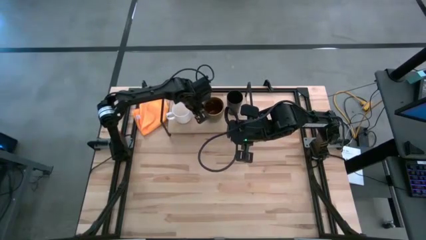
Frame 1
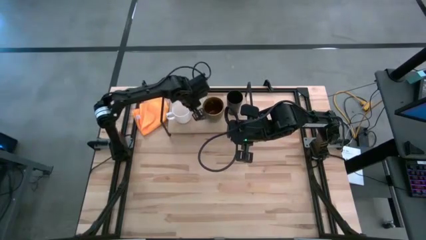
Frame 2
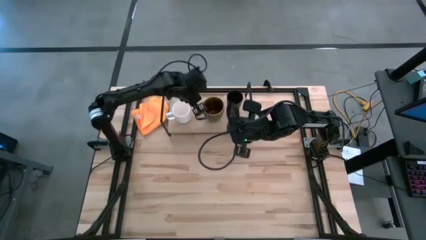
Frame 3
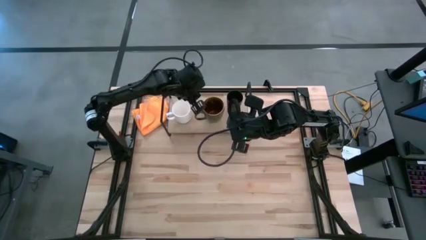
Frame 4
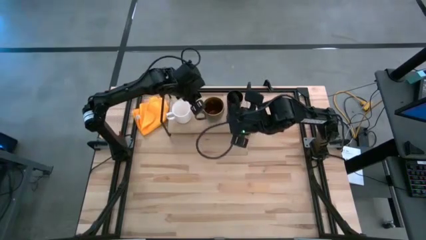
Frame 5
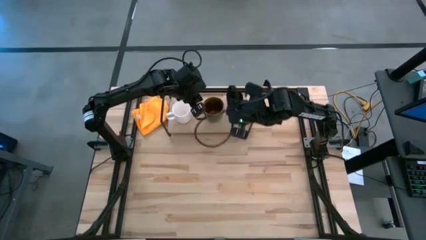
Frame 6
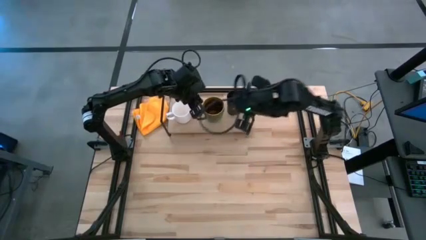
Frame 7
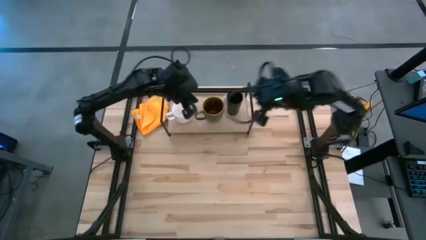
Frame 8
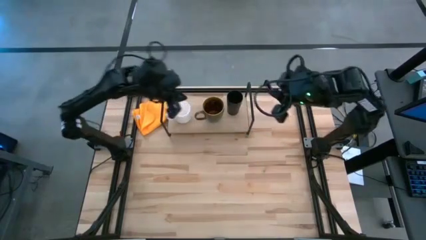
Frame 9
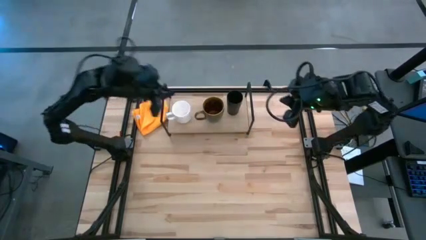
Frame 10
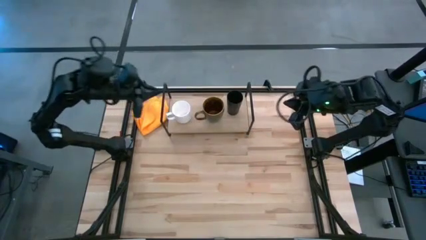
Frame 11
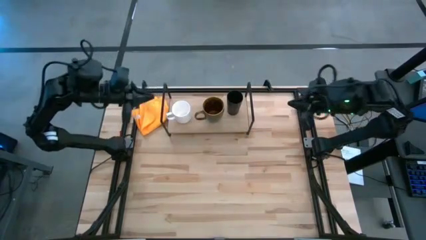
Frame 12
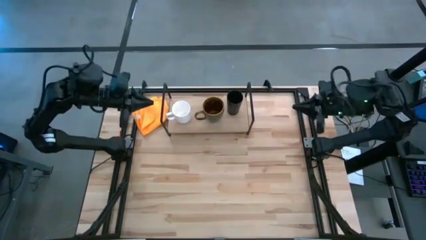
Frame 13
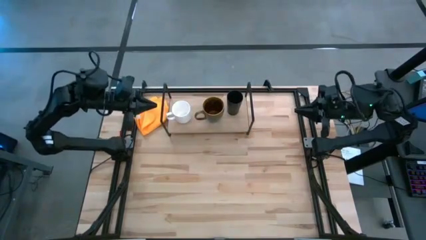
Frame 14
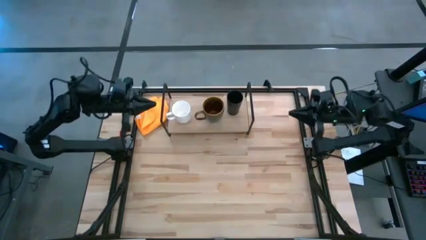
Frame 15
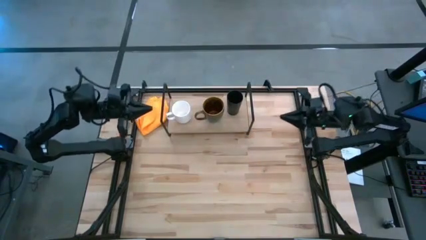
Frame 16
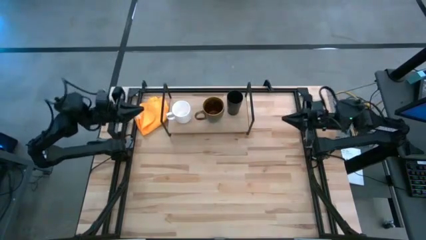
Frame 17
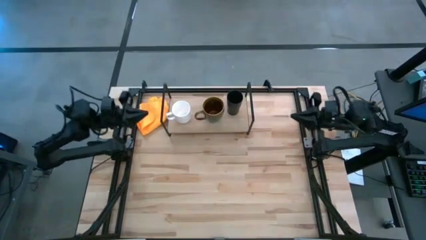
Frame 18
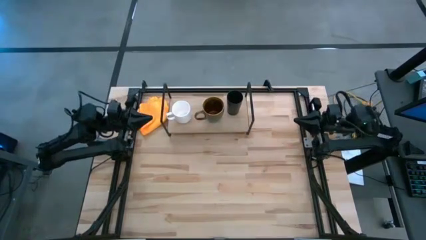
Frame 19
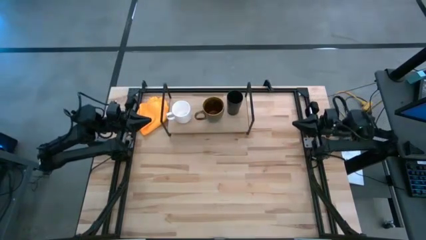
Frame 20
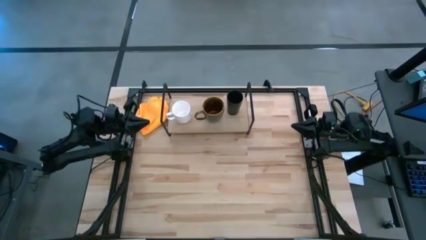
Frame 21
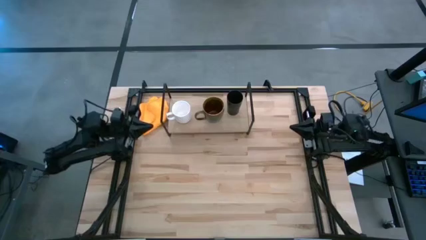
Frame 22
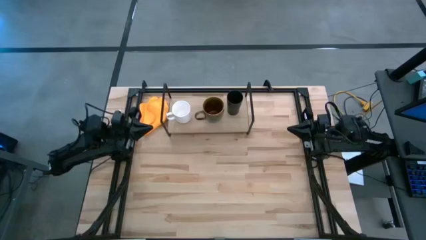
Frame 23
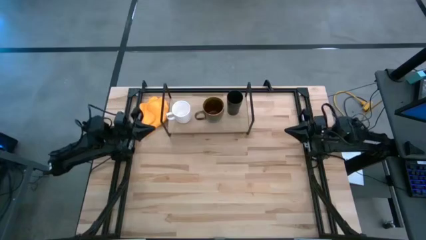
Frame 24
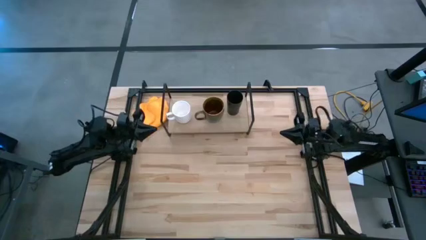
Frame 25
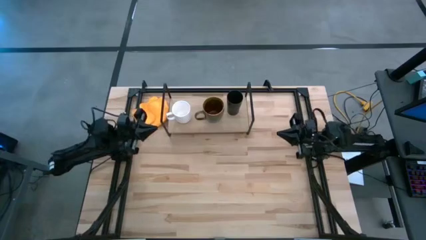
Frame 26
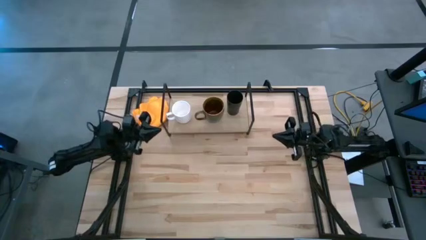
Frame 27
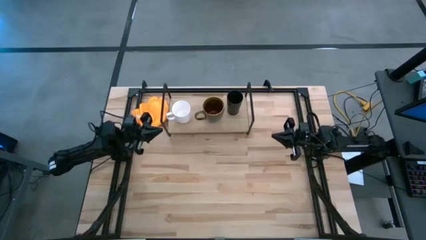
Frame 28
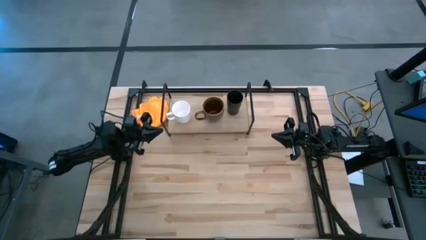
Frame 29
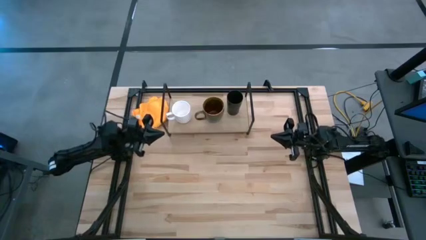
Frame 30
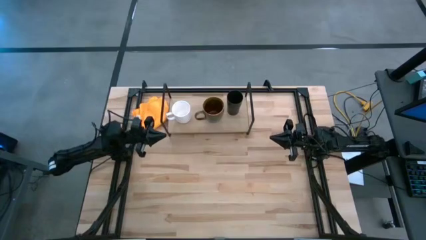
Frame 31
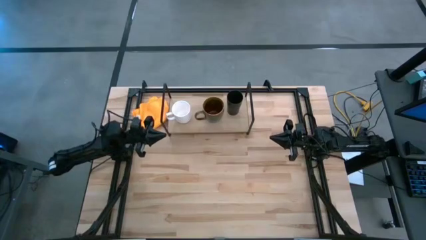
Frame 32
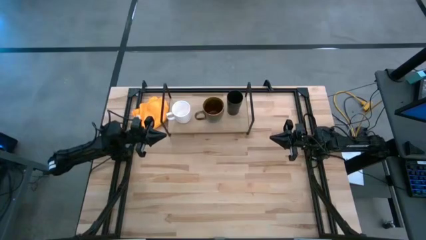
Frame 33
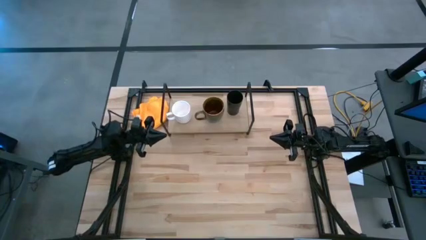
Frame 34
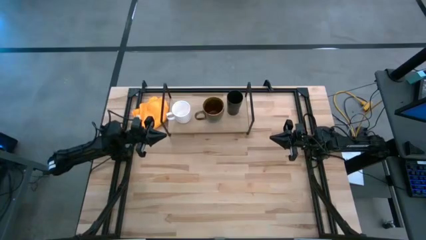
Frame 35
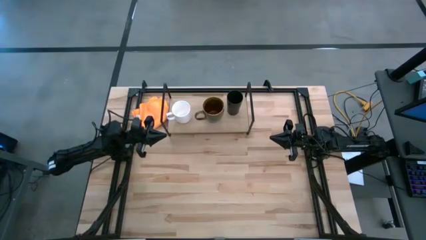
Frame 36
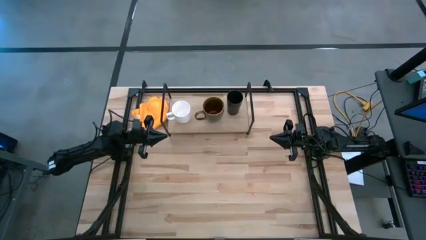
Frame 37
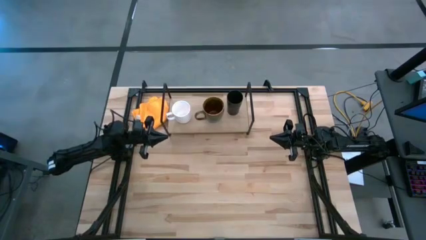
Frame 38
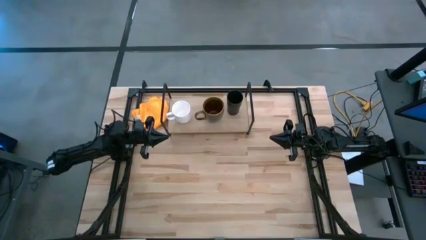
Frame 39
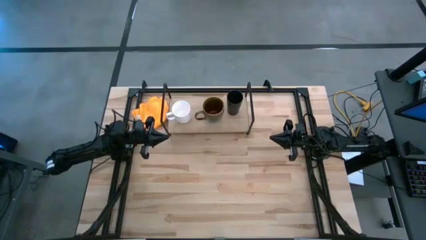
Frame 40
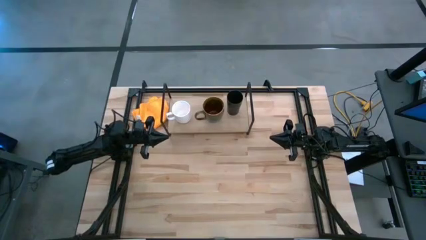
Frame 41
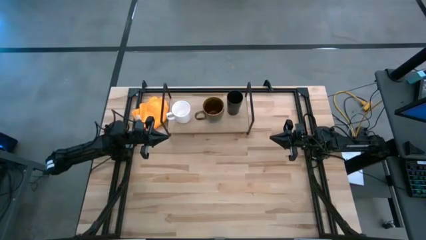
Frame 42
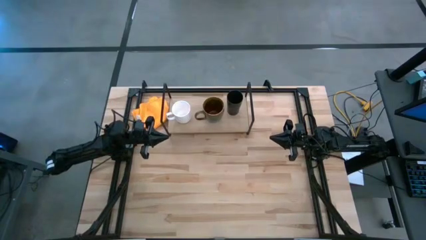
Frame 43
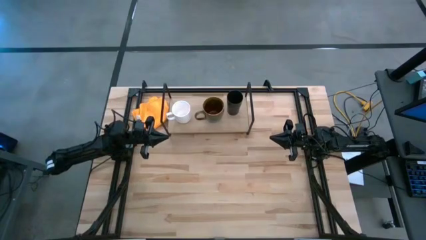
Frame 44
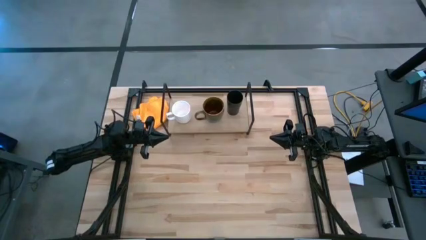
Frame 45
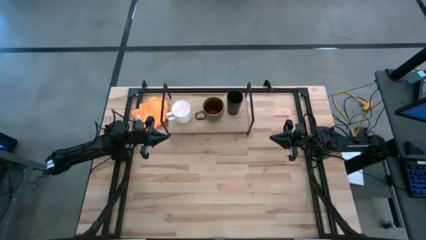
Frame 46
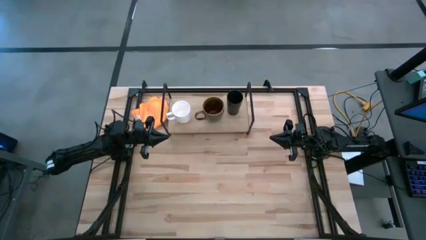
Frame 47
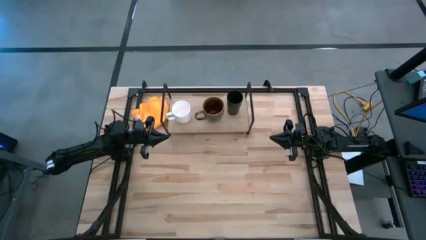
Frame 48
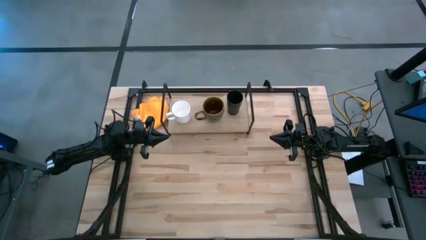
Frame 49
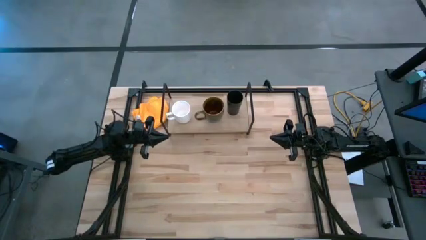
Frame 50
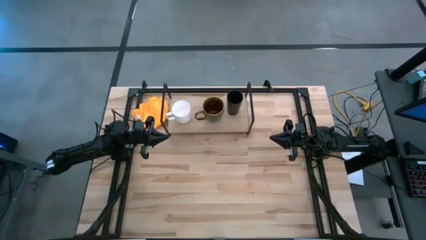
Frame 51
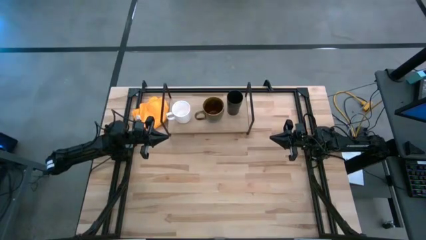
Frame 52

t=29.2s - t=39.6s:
Task: Stack small to large cups/mugs on shelf
Return to Home Position
